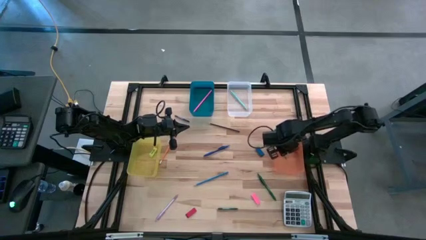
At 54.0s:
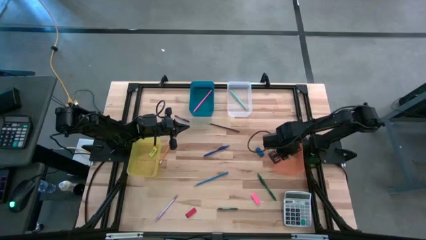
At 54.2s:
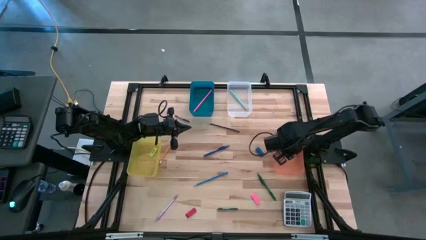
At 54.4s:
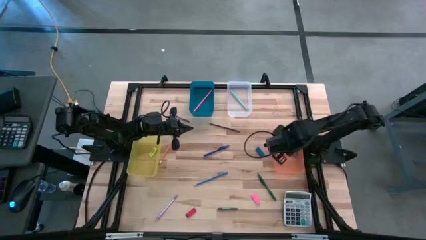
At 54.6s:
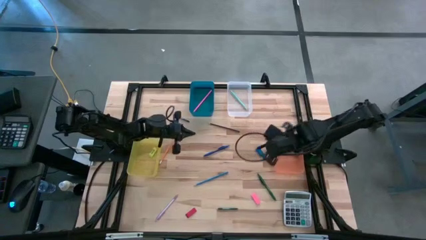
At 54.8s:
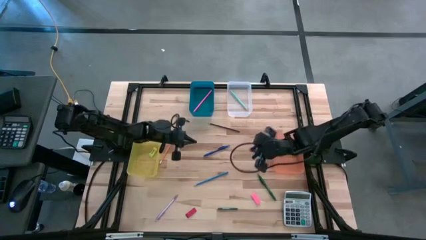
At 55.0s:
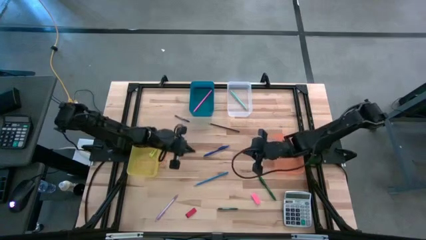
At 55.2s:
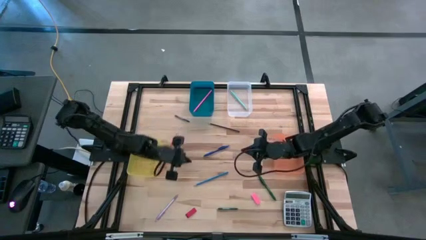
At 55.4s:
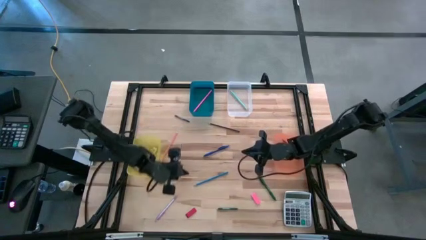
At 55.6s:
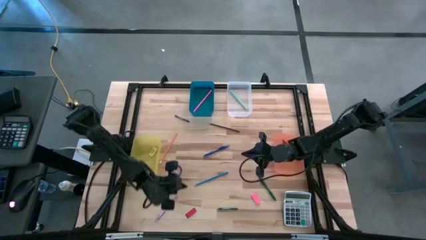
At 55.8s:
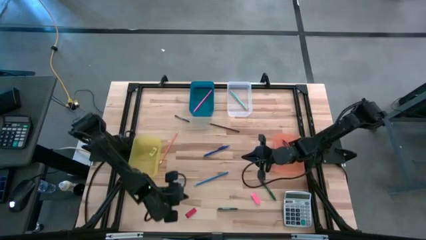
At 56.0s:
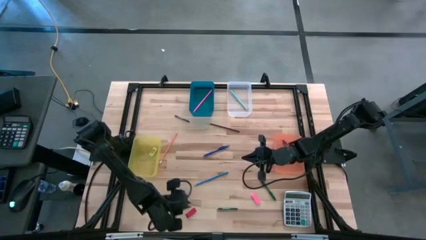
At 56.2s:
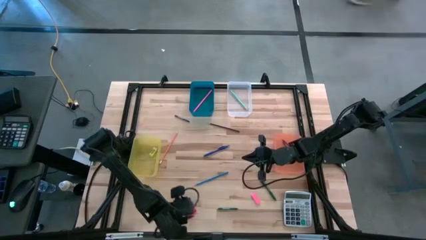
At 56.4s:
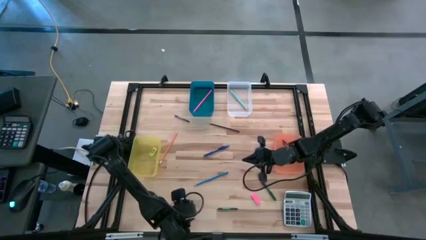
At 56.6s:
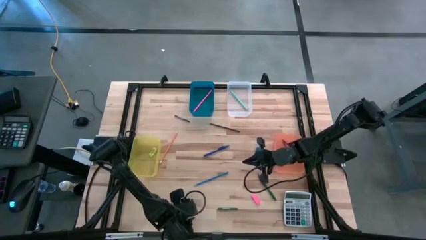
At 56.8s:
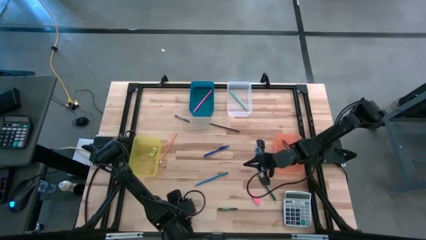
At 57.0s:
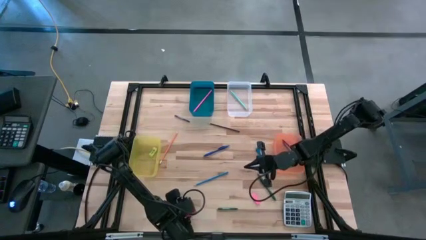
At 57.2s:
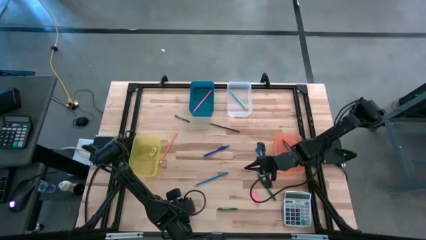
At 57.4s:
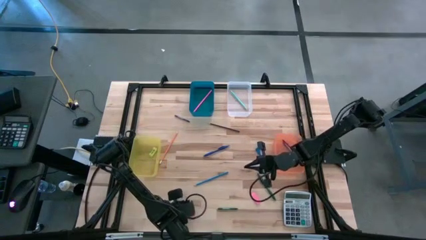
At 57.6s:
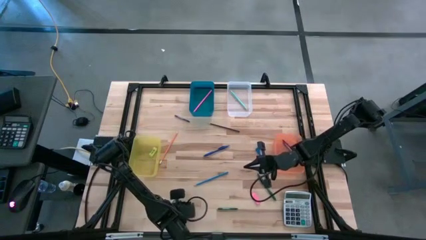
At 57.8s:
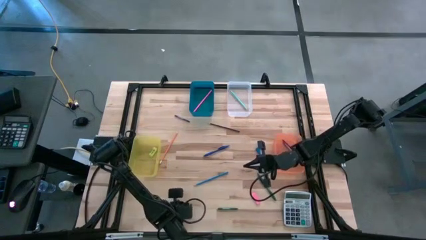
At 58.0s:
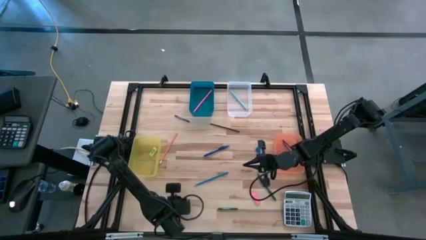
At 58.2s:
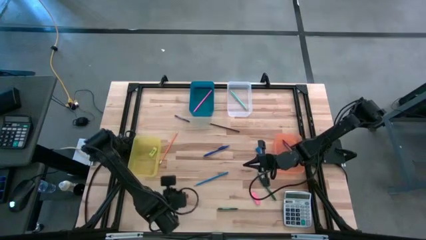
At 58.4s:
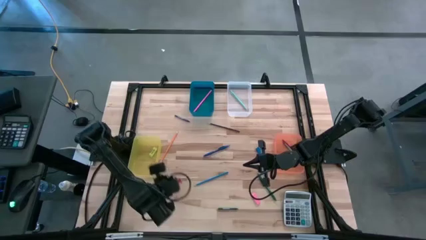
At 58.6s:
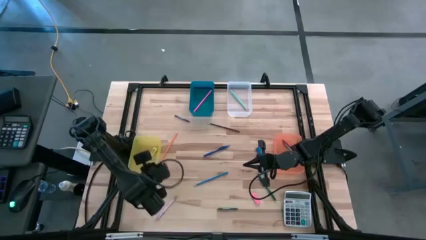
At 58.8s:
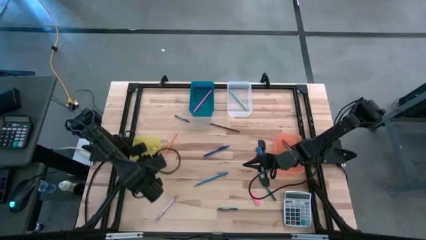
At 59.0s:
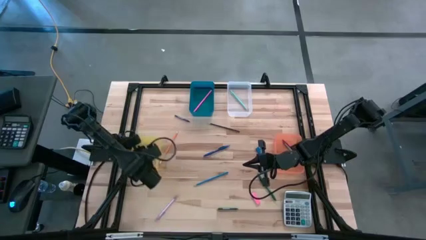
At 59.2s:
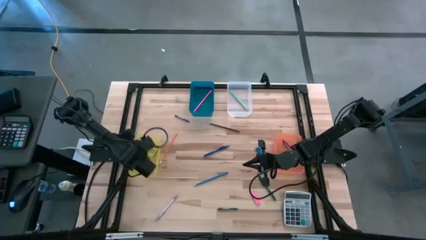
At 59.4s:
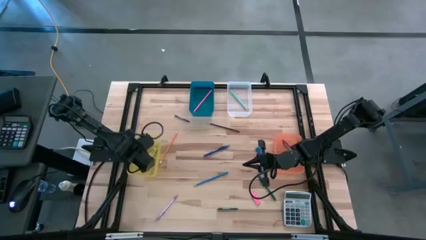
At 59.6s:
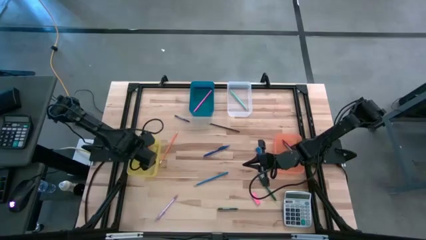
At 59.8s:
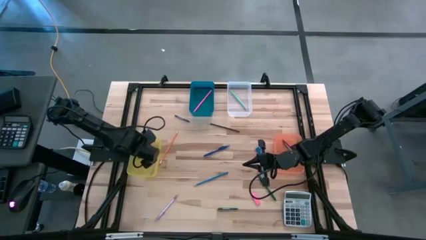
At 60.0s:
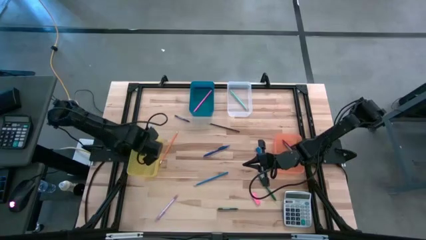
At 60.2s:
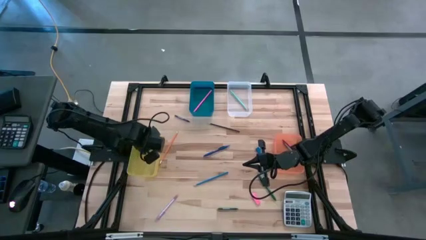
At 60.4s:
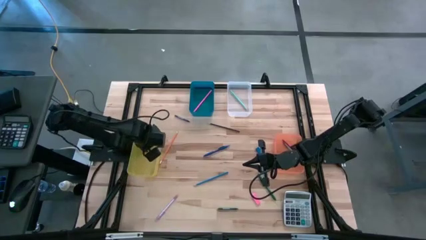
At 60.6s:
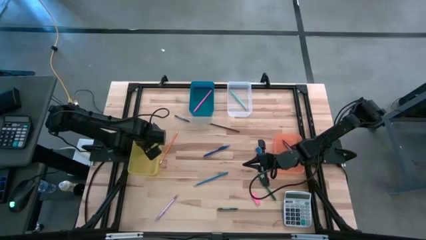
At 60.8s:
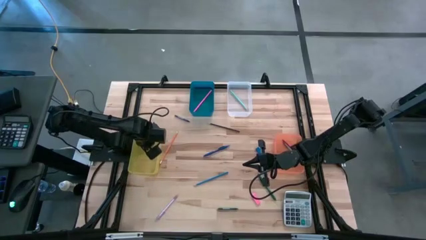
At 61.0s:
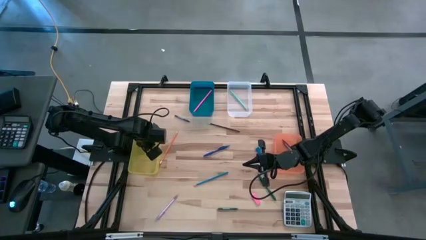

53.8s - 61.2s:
Task: Sort crayons/erasers/pens/pencils in bins
Put the red eraser into the yellow bin

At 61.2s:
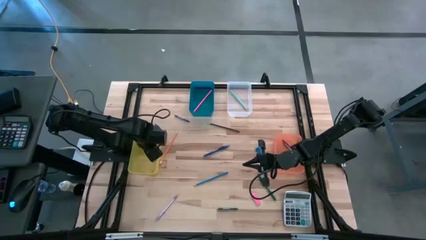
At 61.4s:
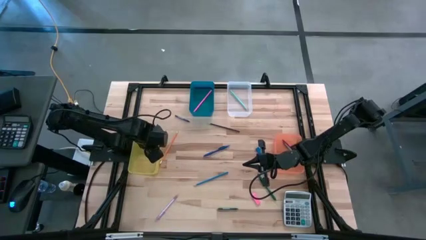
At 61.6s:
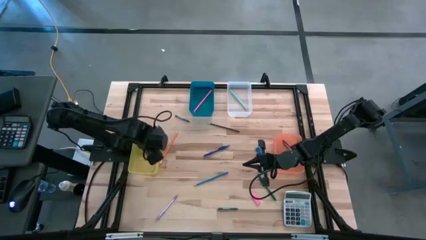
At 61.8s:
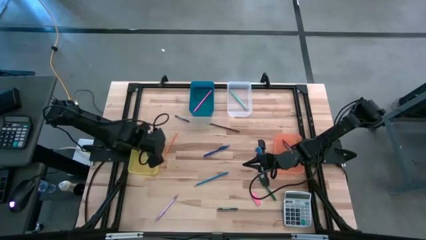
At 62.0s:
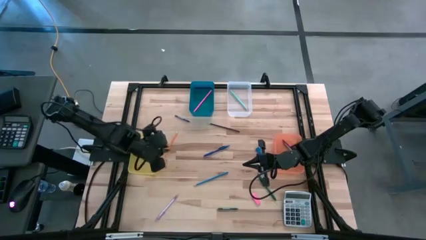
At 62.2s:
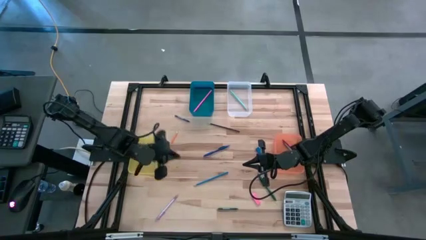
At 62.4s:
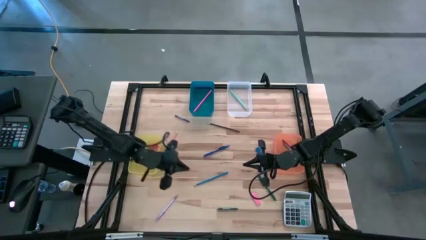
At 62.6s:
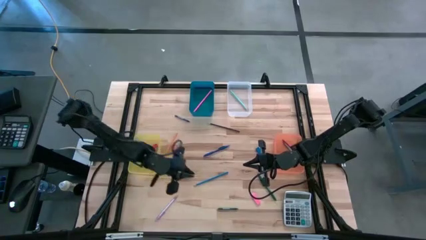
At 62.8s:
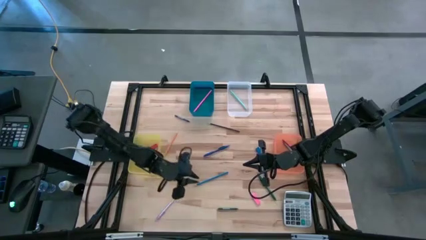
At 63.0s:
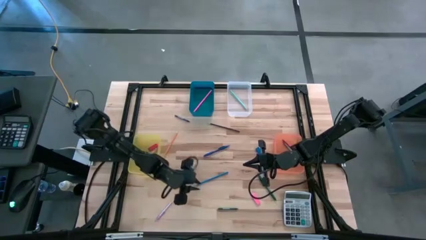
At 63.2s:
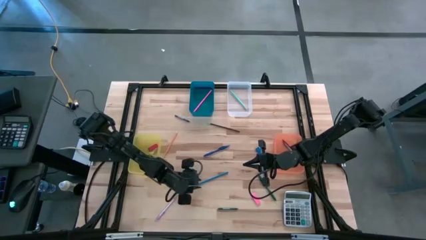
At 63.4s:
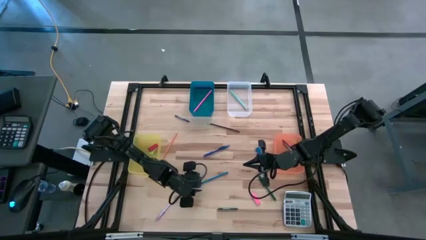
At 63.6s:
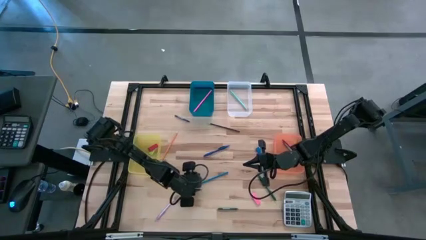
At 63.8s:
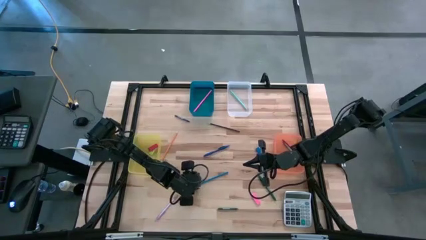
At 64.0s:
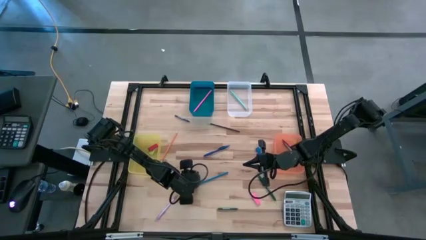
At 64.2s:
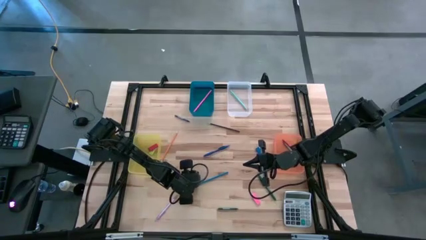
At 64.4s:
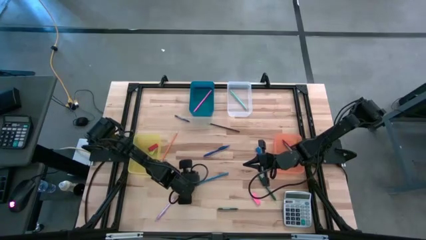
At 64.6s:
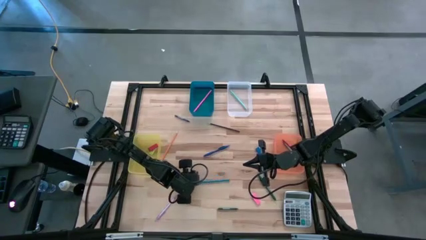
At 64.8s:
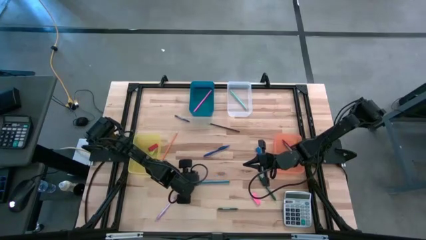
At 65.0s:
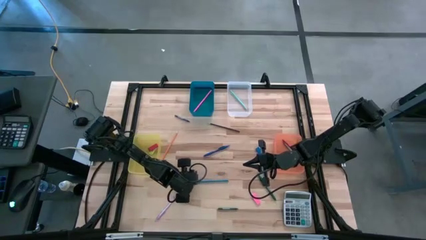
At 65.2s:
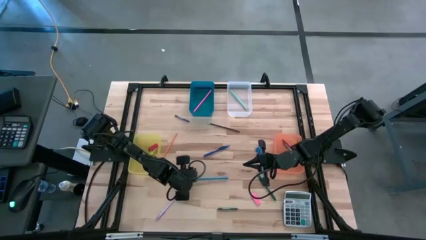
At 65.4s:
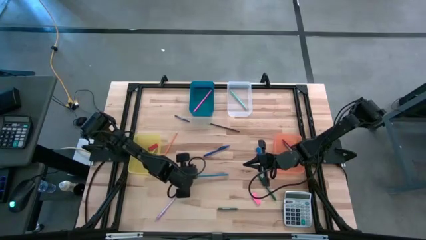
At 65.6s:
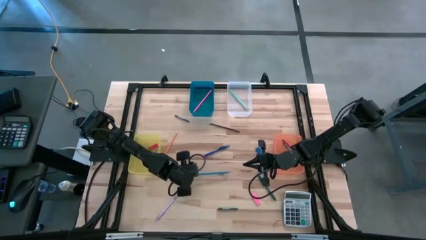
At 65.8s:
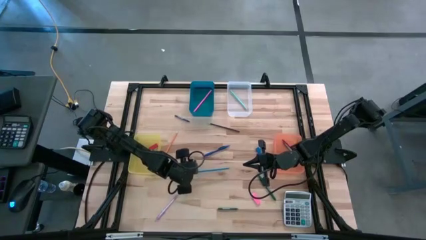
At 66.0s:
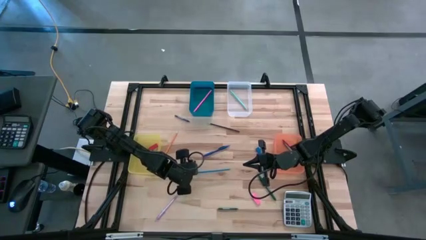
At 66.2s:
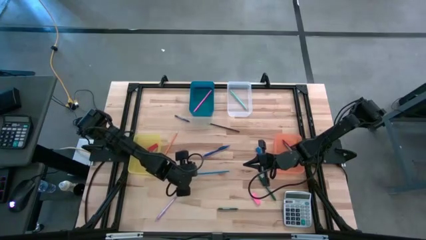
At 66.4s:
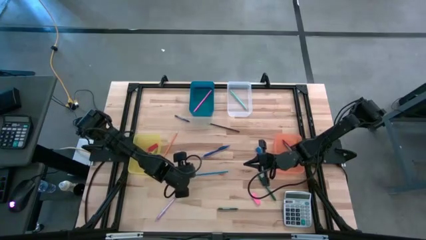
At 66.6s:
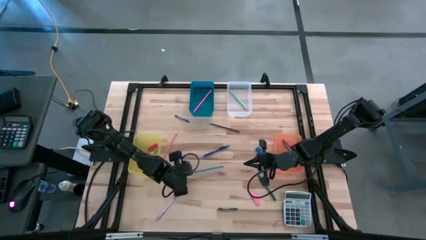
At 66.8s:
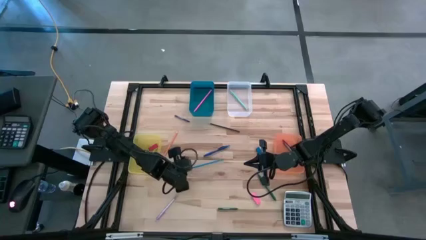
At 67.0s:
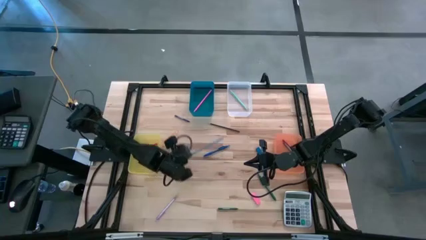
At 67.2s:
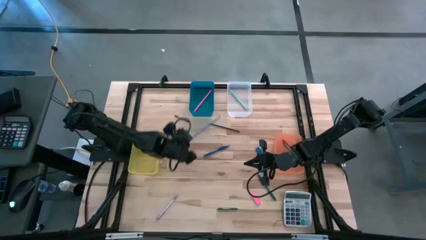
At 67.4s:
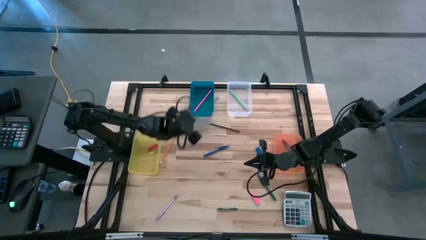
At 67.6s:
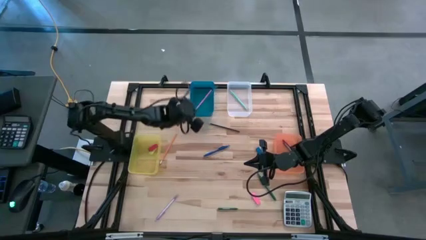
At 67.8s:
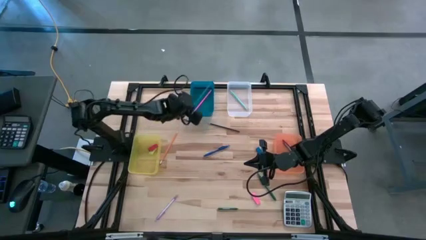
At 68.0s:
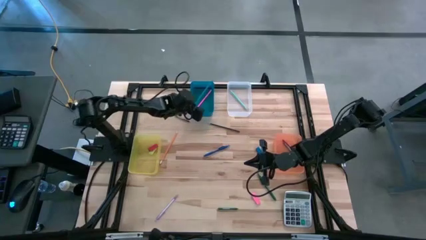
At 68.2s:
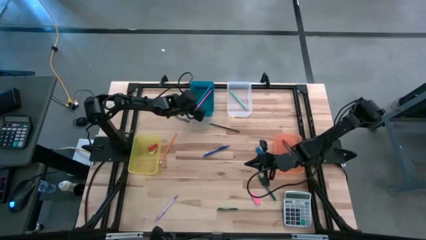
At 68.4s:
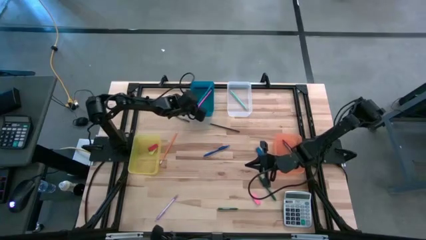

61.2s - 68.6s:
Put the blue pencil into the blue bin

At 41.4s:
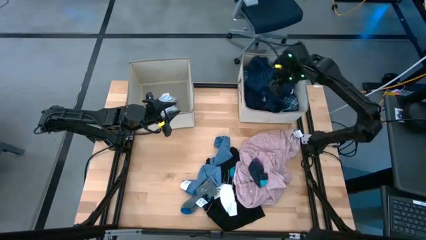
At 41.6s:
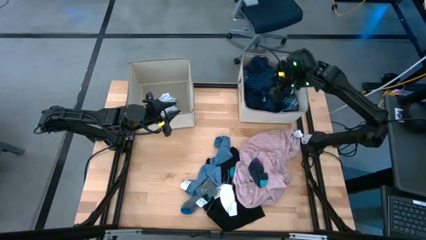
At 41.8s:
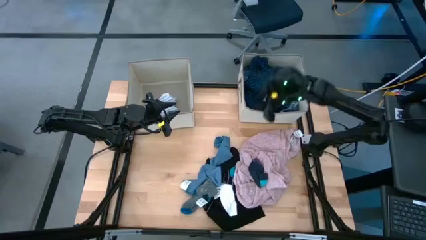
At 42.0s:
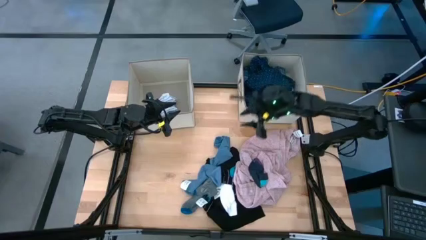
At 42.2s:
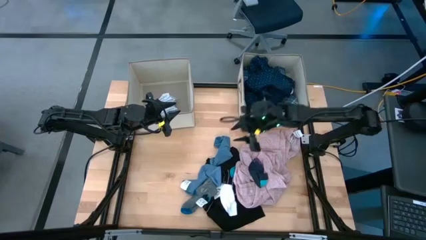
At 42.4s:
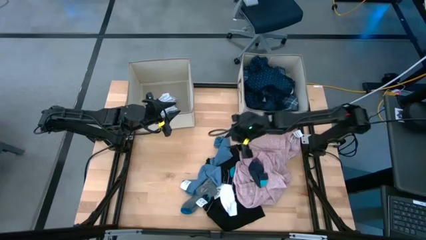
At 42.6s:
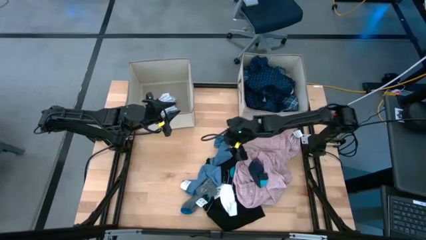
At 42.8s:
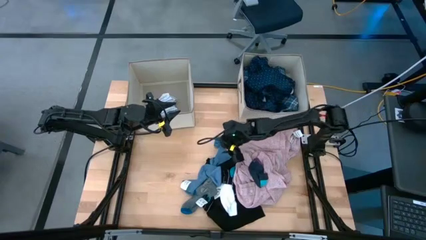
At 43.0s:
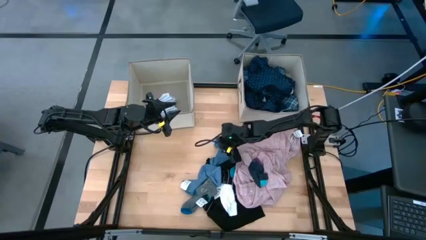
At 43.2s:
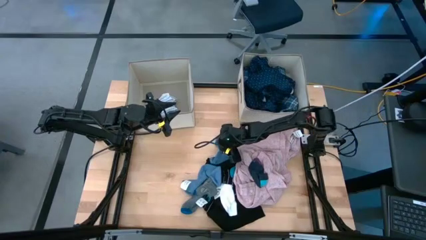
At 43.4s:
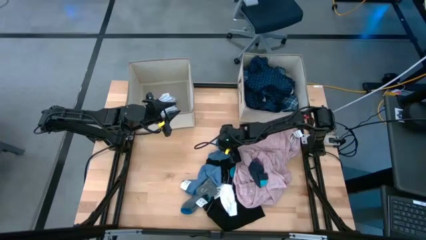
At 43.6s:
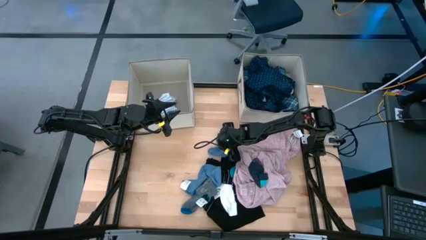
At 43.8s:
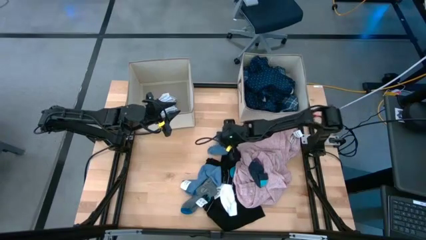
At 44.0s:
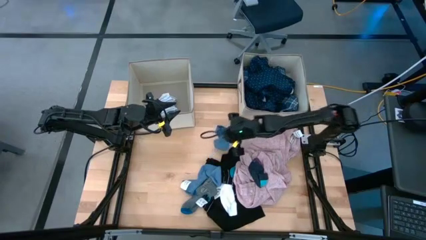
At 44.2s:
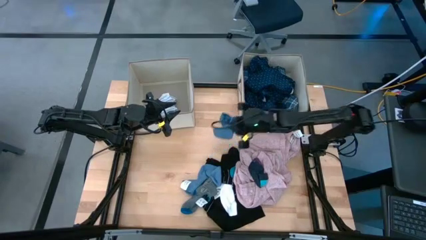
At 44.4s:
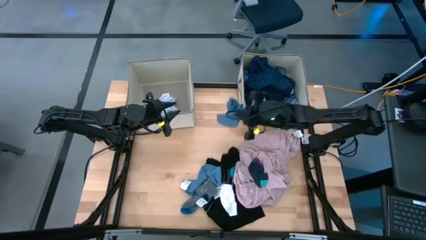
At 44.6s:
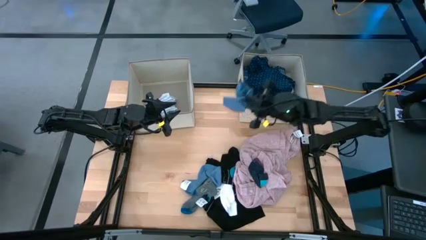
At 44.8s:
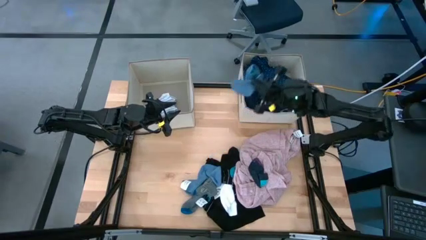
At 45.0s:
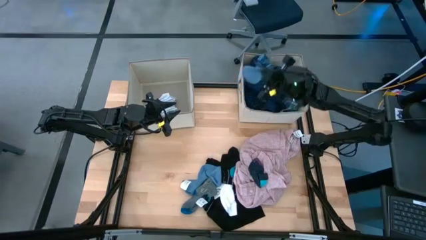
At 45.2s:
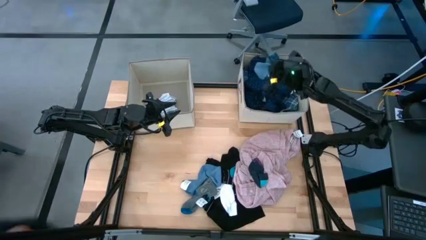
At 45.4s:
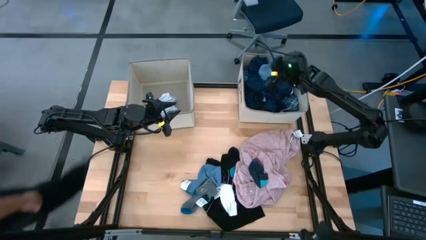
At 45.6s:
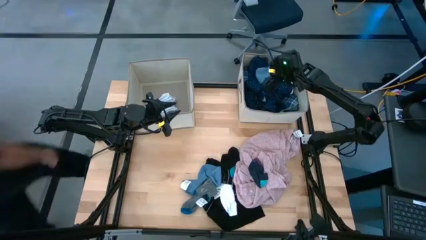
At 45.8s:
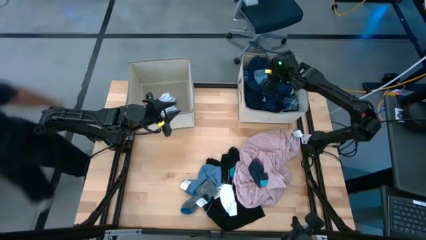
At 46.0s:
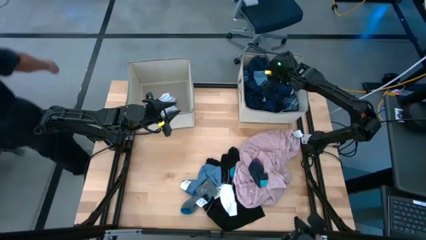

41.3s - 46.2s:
Task: Sort clothes
Put the blue sock into the right laundry bin
